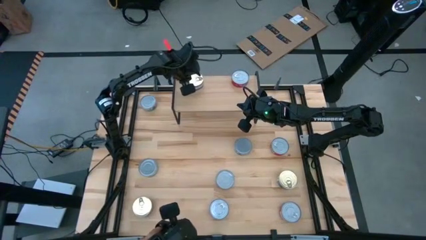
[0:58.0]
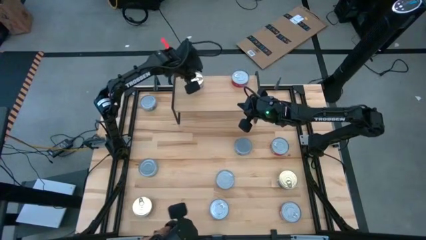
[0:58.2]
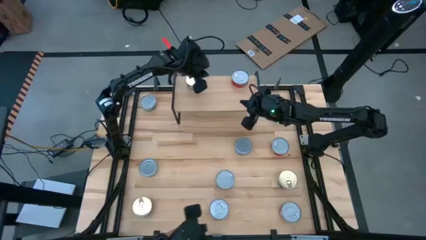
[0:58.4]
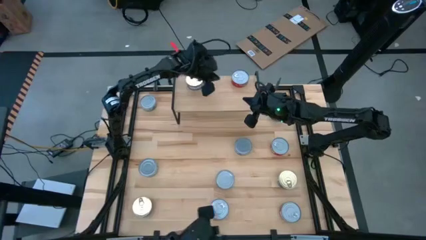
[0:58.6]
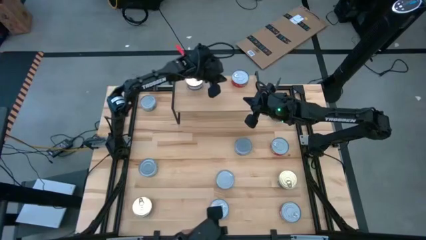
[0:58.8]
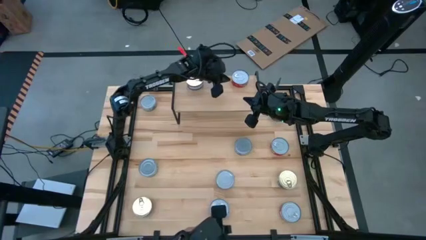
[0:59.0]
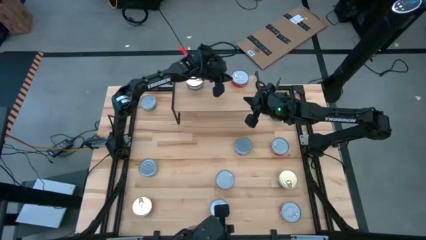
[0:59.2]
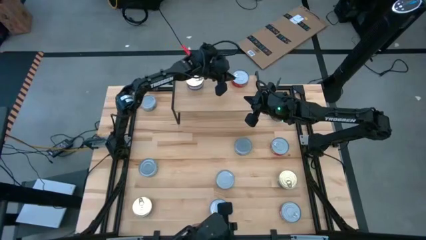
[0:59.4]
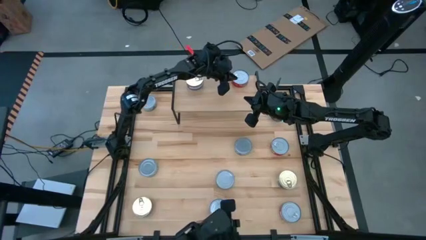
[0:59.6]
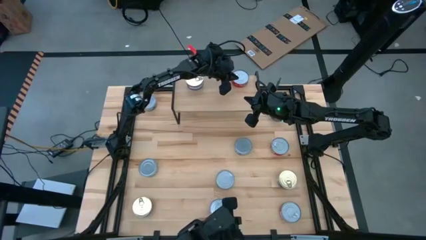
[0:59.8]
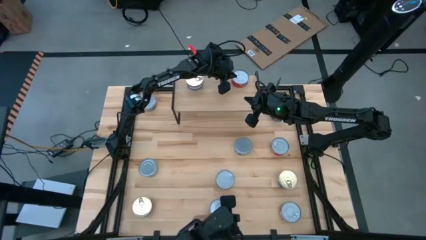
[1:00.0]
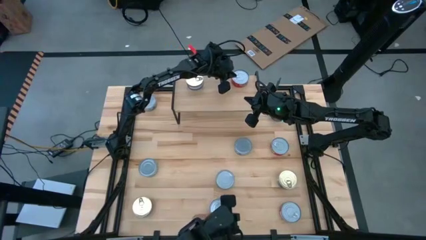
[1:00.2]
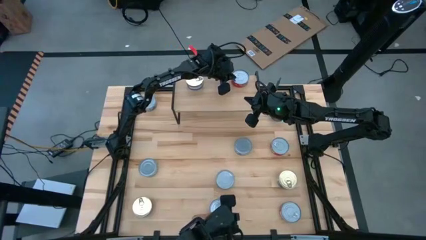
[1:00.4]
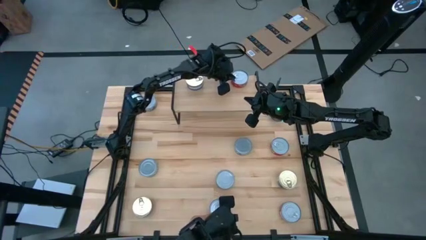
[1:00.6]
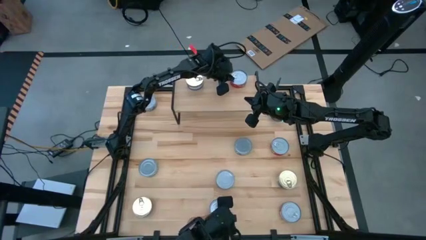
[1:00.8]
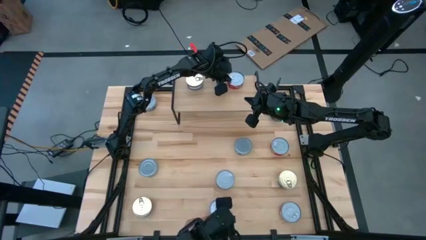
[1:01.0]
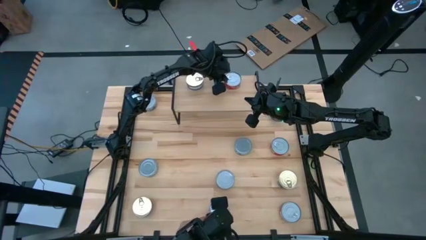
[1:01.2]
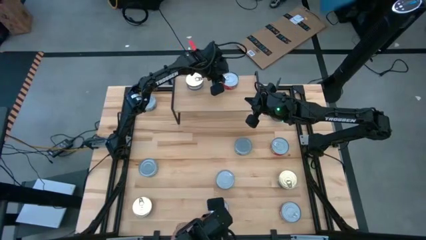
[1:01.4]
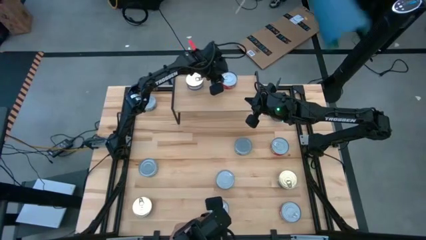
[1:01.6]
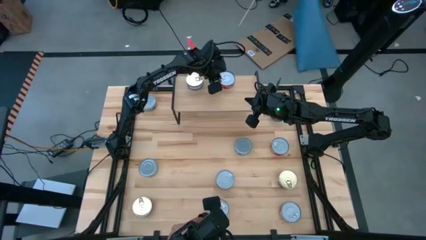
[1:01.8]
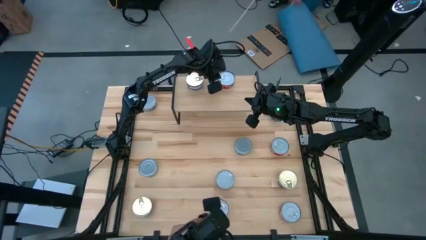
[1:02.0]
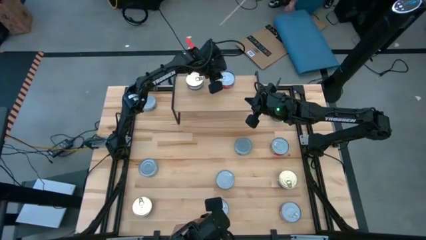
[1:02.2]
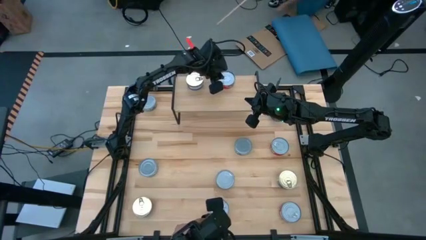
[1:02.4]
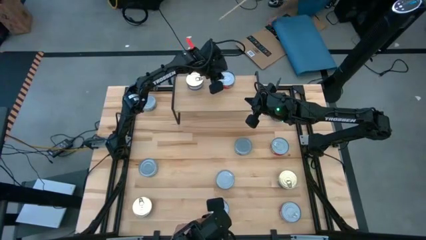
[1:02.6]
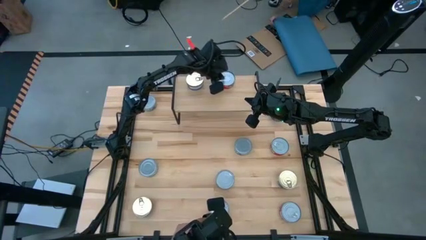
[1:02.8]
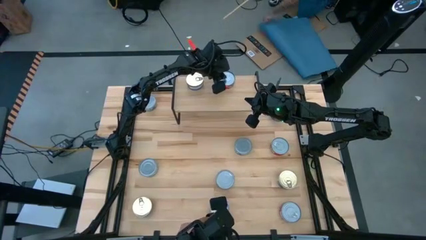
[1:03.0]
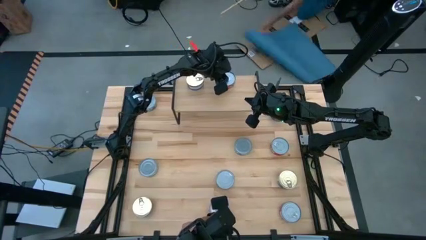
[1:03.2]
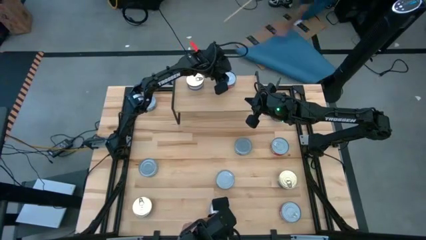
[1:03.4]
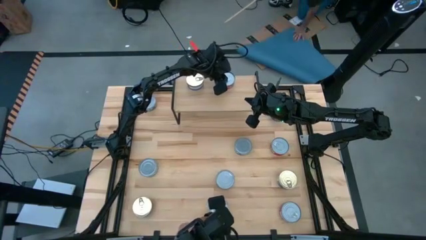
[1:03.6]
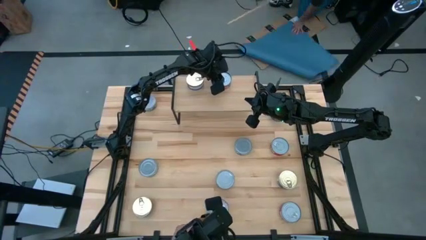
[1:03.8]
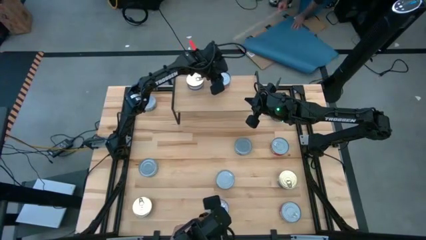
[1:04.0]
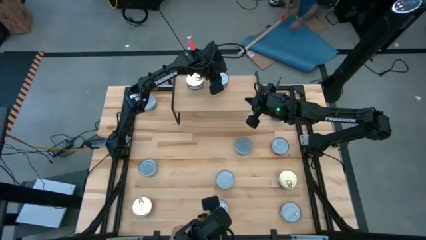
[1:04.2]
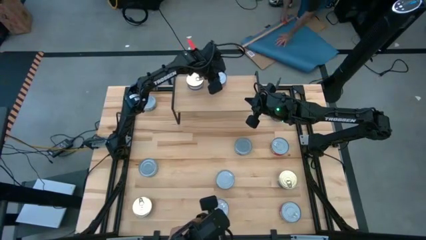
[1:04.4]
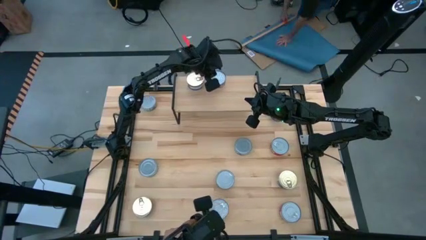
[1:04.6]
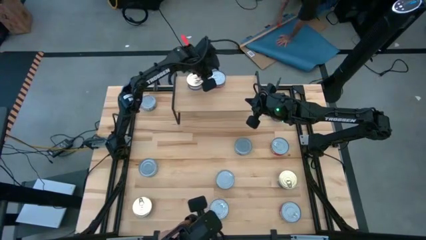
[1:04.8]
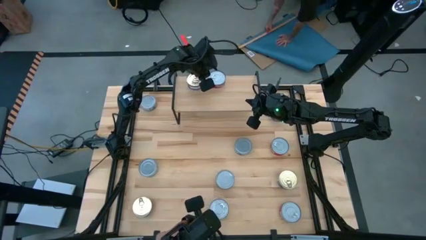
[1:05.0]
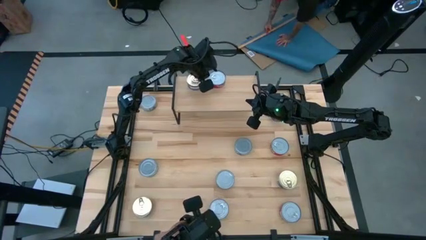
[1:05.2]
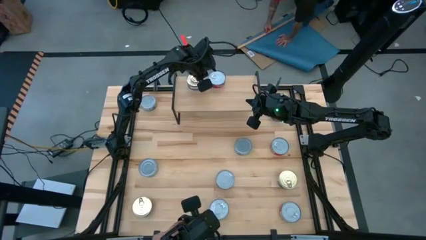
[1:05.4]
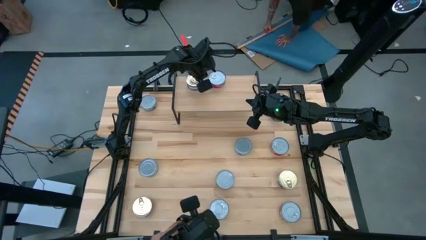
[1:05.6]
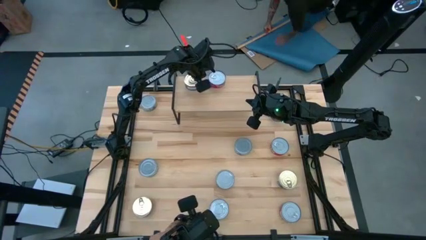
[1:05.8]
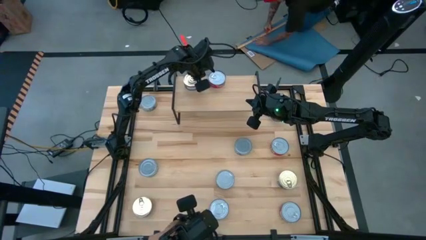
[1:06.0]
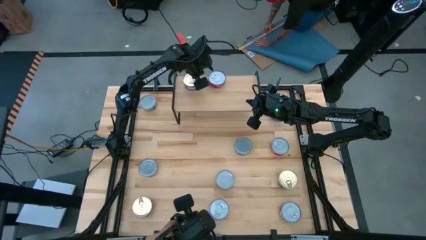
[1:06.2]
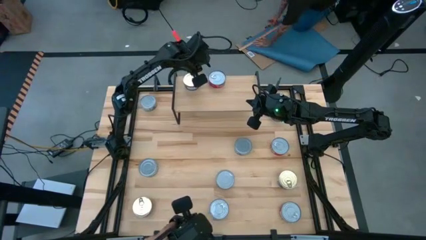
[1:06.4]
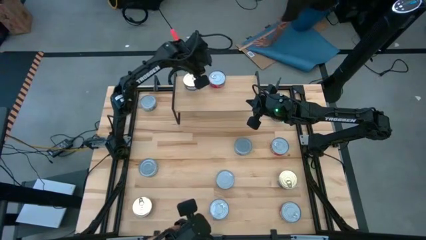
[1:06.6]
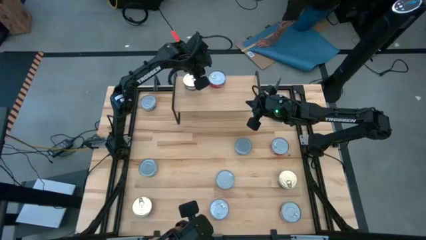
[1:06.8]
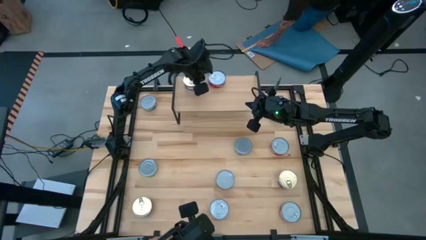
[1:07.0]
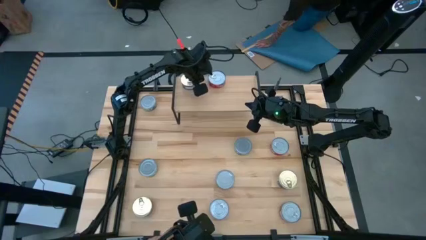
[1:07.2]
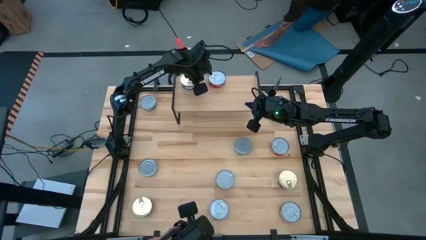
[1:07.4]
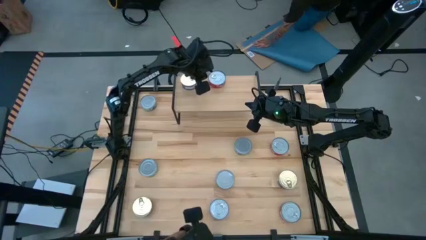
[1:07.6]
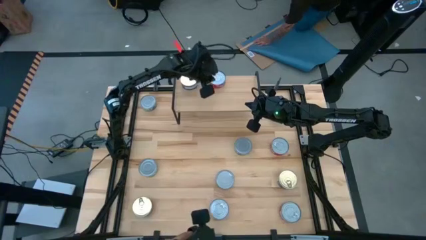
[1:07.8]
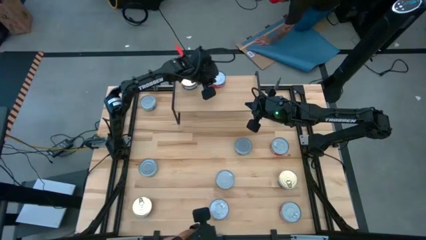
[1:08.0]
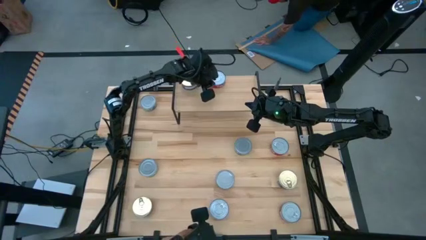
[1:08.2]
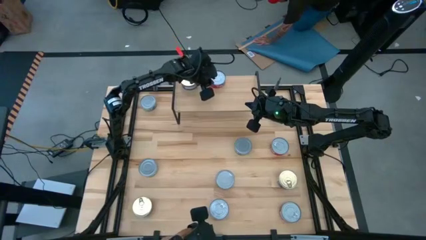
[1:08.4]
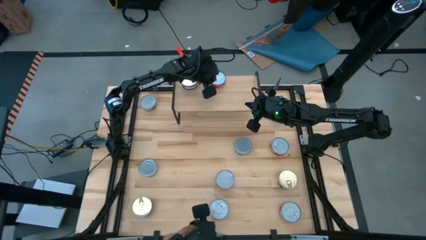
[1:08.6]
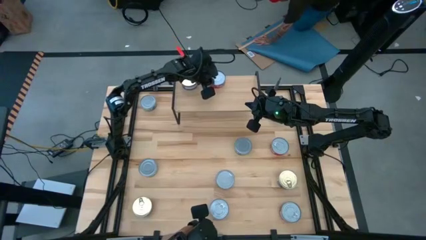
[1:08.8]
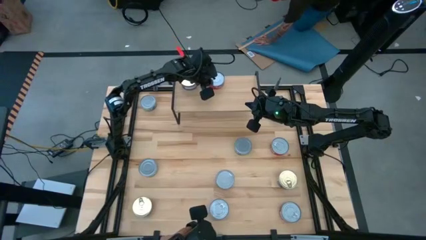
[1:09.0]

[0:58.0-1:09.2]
Task: Stack canned seafood by type on shelf
Adjust the tuna cans on the shelf

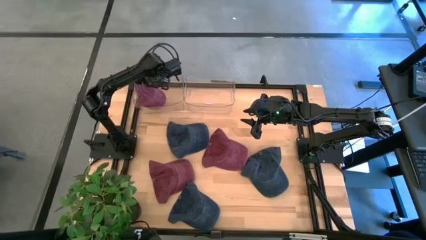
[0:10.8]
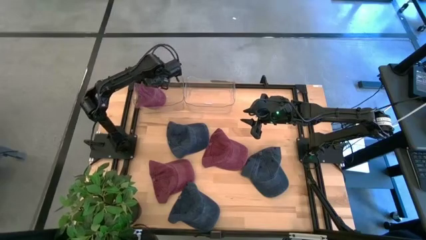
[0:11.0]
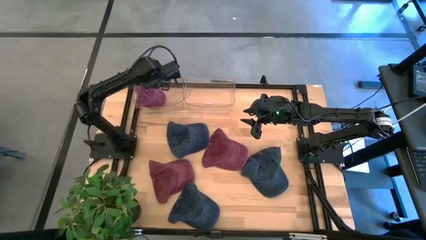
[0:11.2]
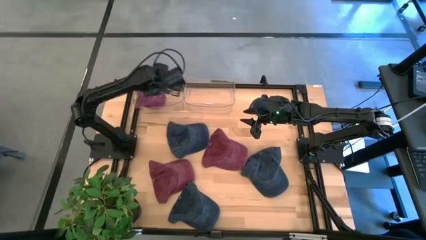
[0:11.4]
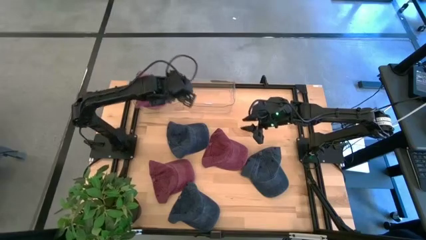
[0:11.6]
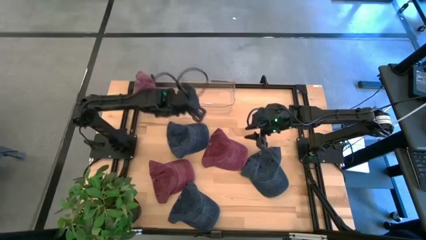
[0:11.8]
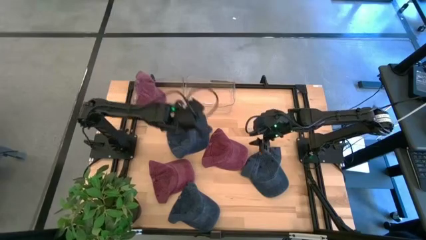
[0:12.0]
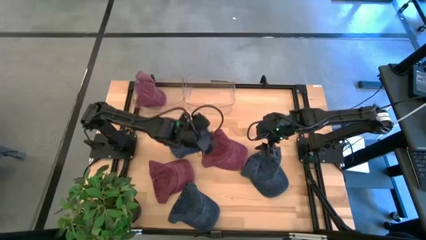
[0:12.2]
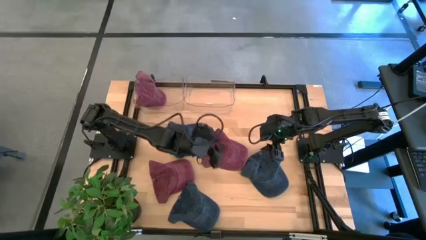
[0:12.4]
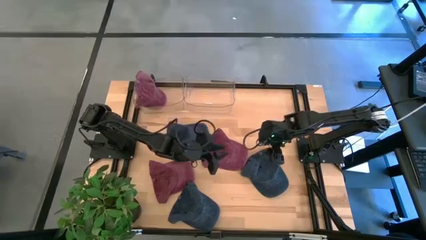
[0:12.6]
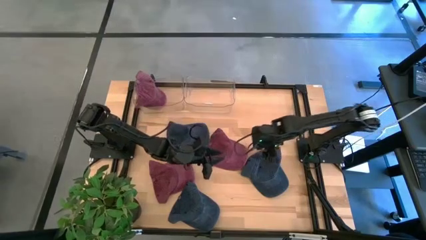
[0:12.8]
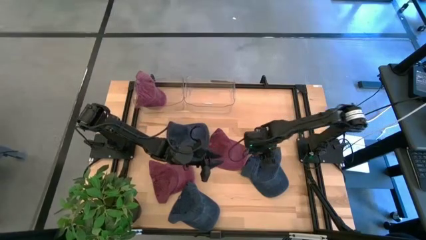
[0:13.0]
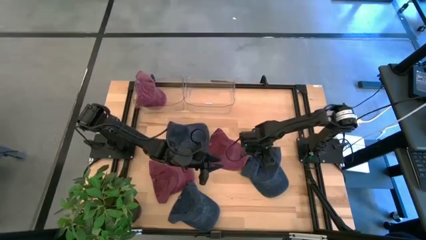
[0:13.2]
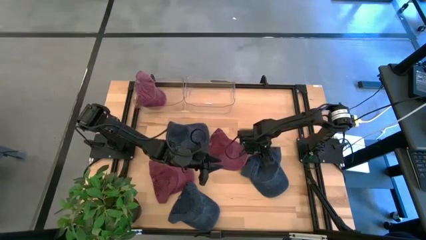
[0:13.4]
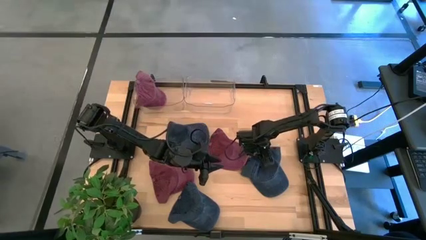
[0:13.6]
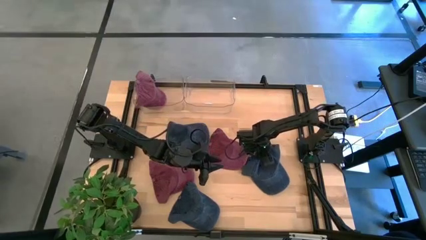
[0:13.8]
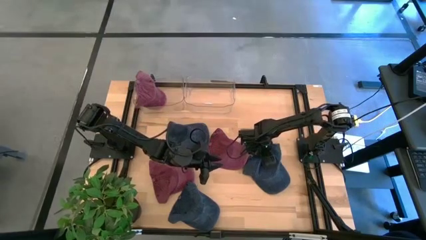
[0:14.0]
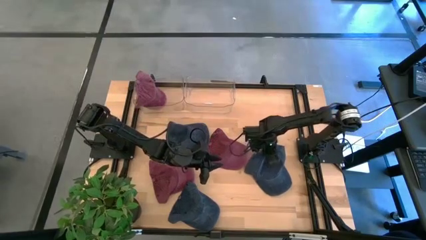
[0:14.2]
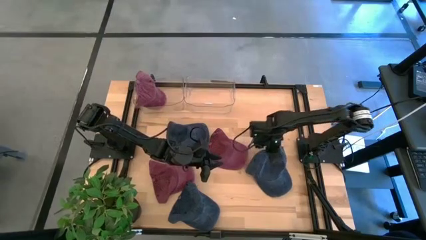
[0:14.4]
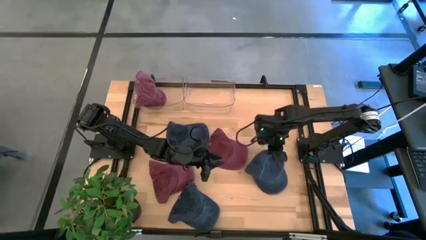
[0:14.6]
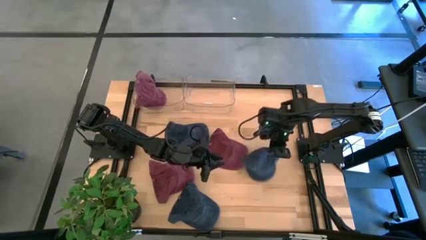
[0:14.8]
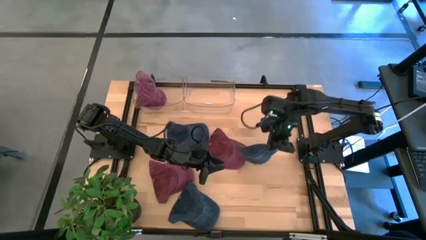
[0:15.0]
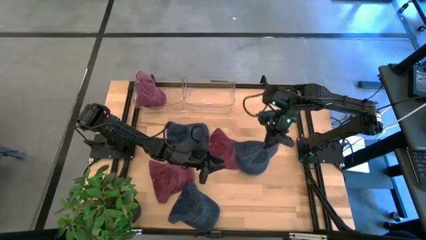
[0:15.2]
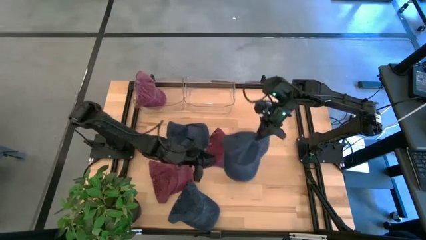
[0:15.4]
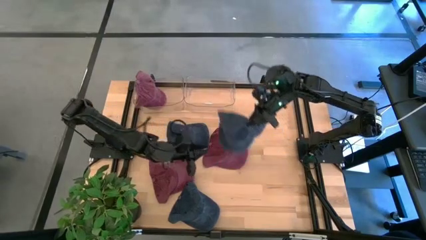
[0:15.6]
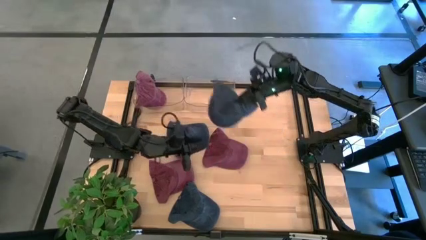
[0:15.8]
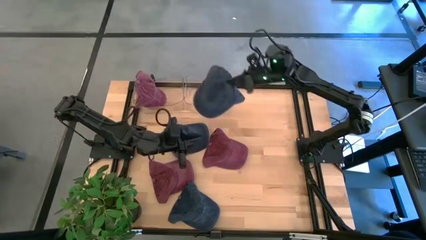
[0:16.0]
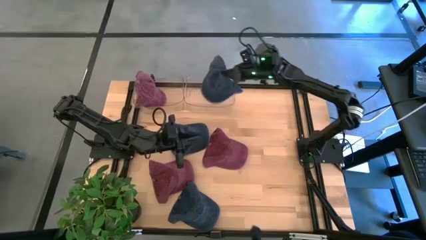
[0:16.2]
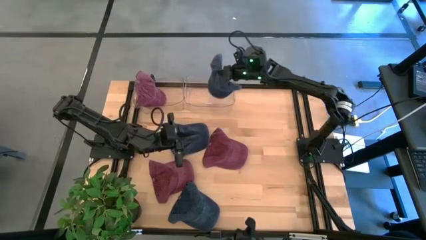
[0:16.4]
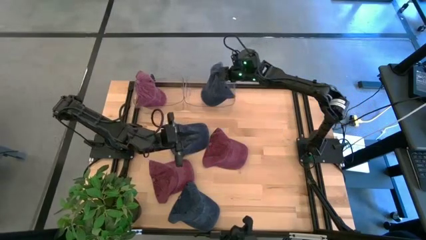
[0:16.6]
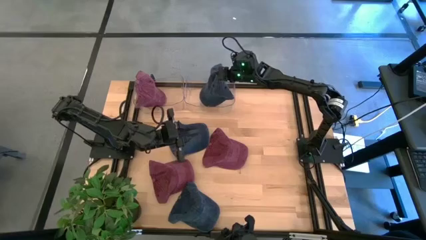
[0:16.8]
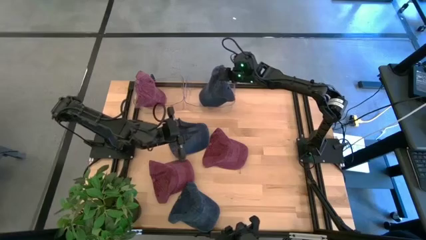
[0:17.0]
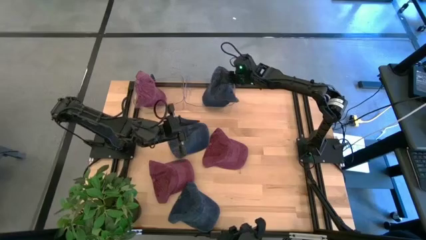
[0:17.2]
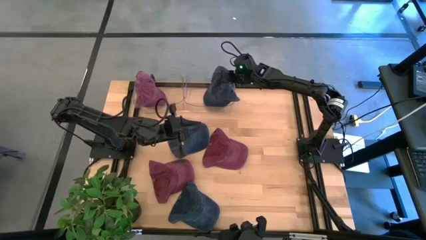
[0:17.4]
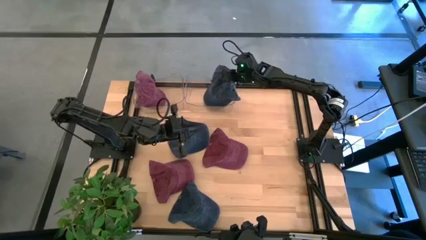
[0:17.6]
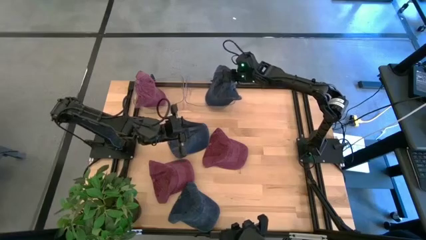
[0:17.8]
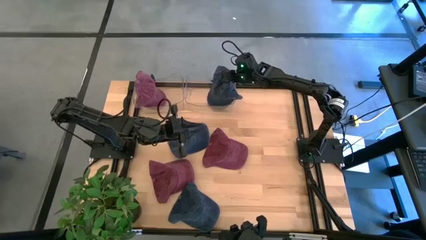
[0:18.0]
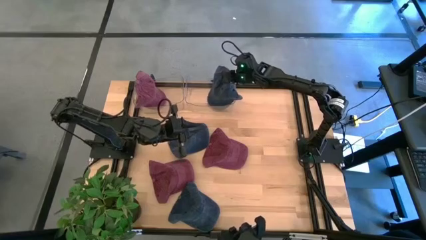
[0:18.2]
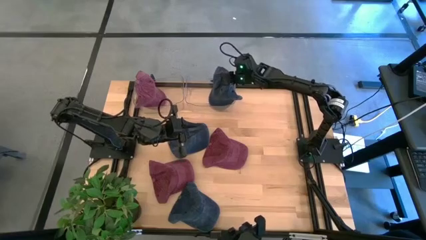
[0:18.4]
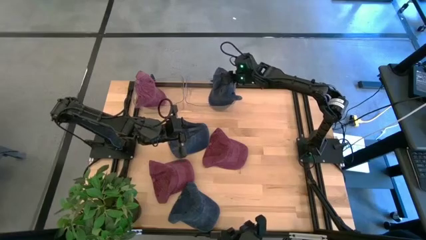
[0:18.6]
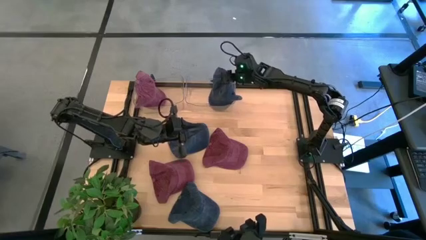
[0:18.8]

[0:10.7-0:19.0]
Task: Pick & Place hat
Put the right middle blue cap into the right transparent bin
